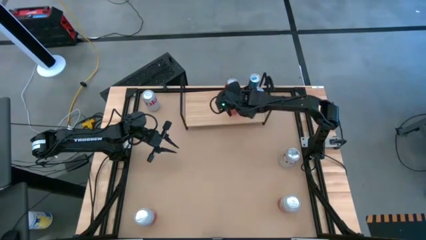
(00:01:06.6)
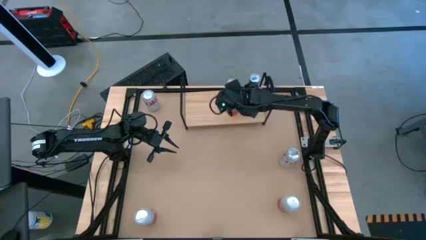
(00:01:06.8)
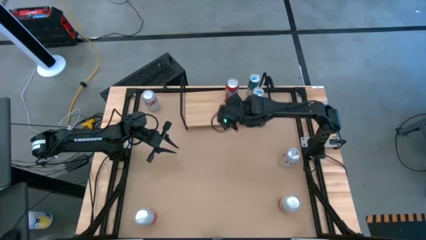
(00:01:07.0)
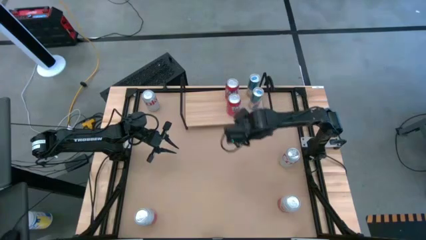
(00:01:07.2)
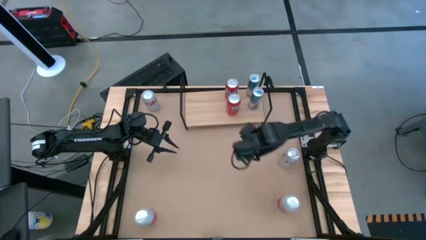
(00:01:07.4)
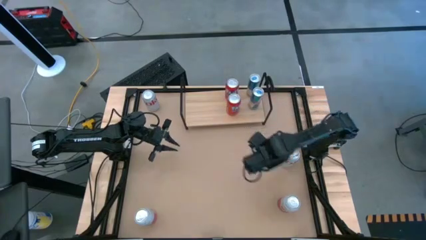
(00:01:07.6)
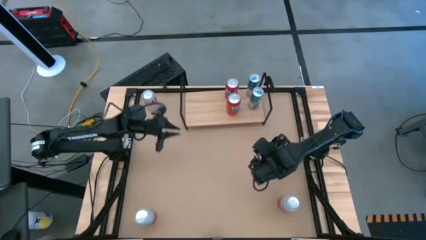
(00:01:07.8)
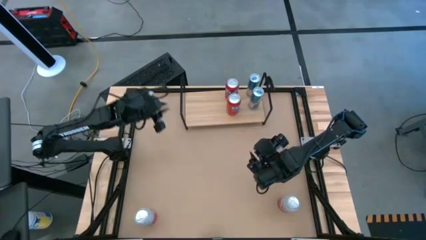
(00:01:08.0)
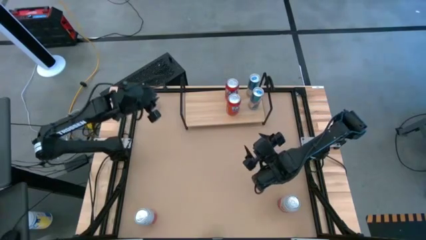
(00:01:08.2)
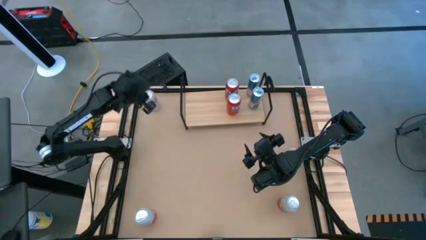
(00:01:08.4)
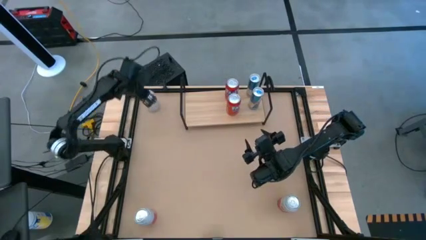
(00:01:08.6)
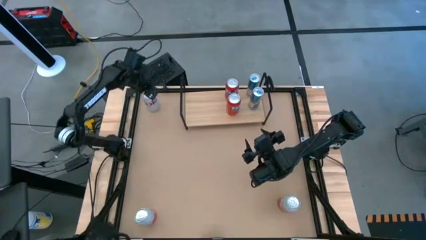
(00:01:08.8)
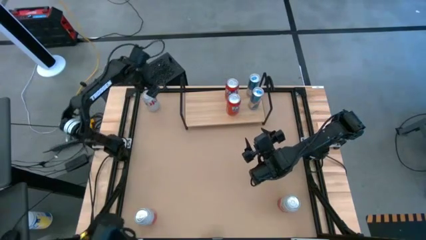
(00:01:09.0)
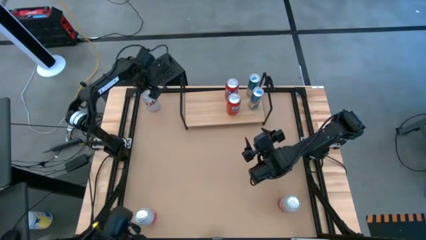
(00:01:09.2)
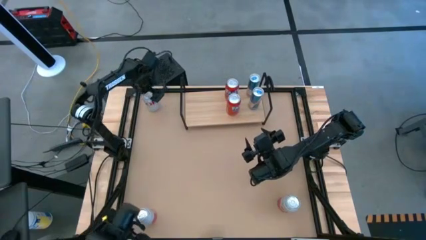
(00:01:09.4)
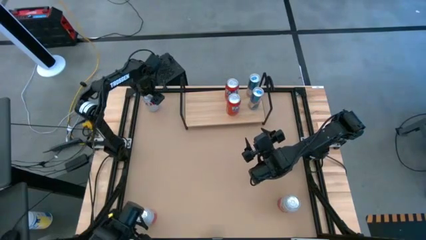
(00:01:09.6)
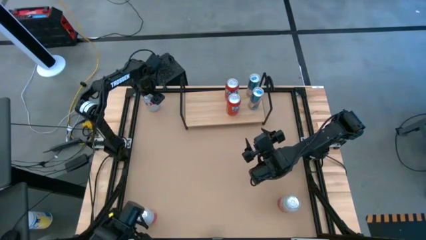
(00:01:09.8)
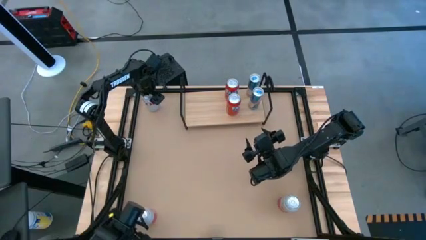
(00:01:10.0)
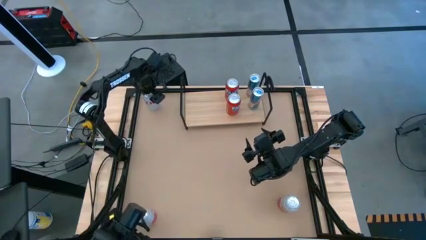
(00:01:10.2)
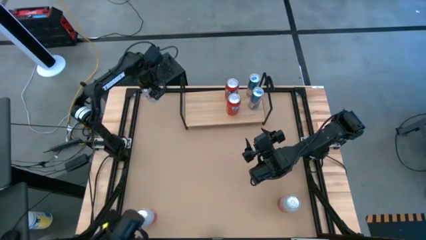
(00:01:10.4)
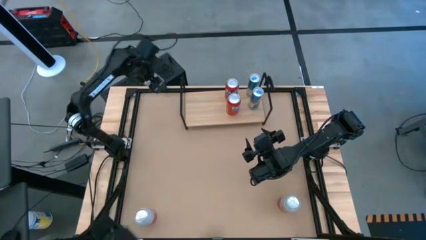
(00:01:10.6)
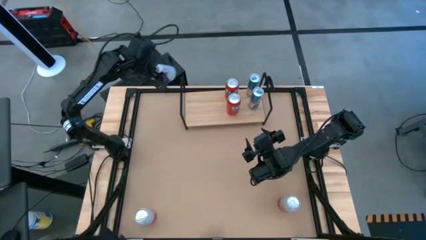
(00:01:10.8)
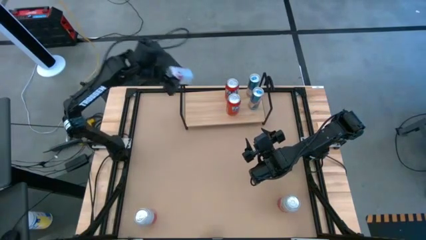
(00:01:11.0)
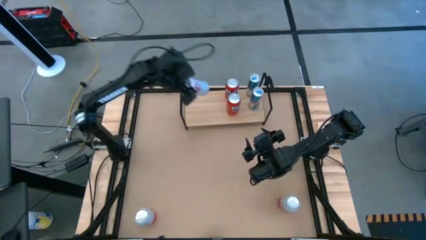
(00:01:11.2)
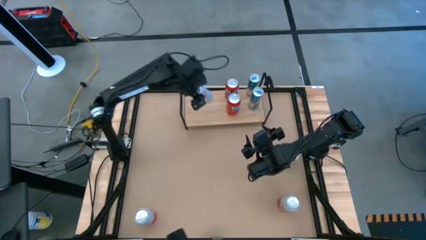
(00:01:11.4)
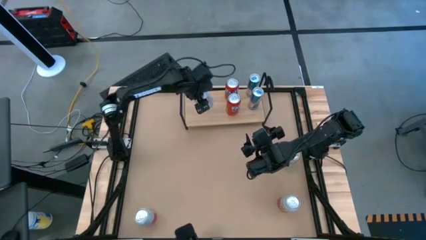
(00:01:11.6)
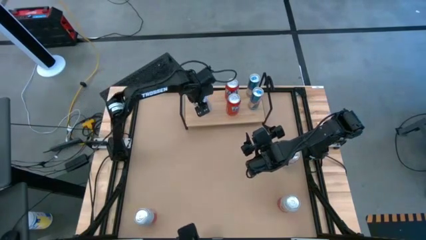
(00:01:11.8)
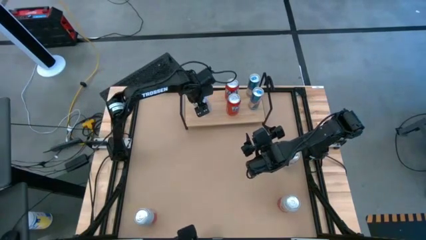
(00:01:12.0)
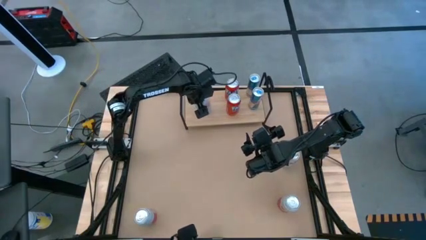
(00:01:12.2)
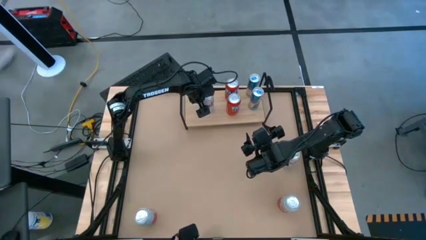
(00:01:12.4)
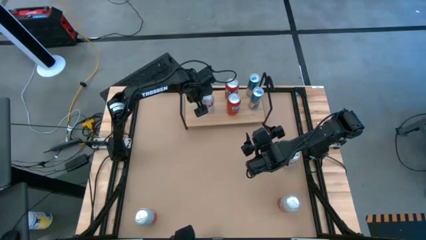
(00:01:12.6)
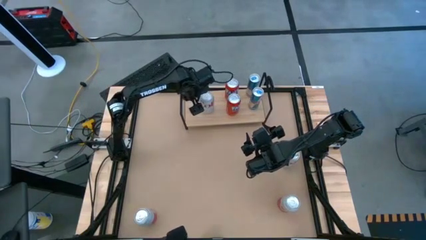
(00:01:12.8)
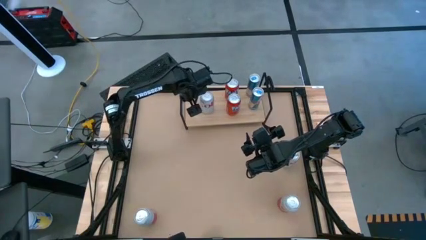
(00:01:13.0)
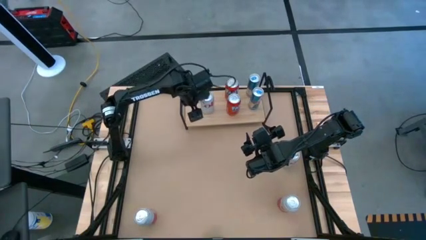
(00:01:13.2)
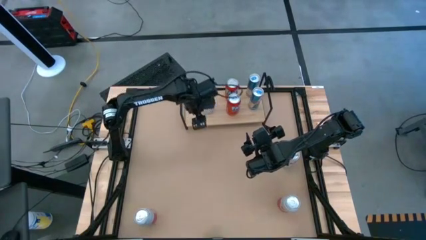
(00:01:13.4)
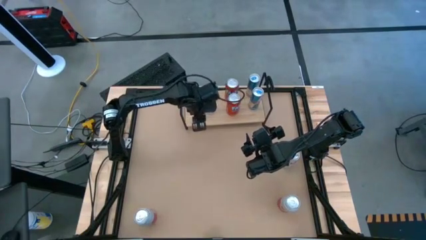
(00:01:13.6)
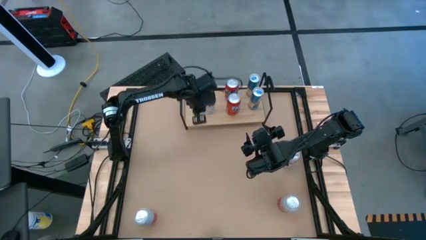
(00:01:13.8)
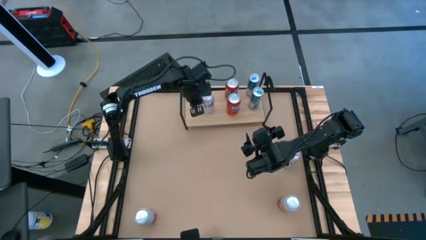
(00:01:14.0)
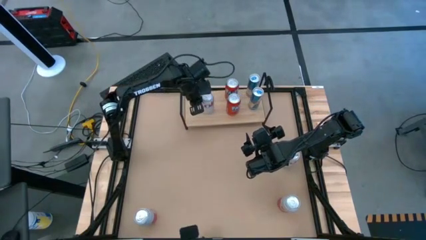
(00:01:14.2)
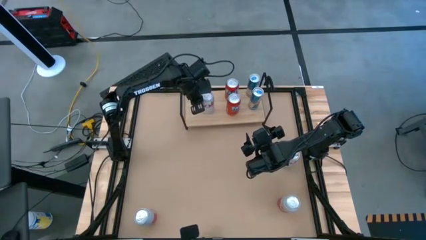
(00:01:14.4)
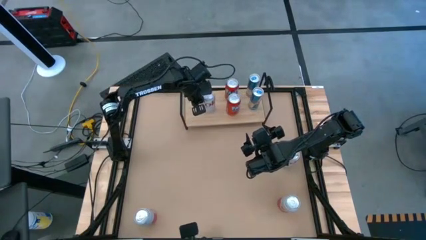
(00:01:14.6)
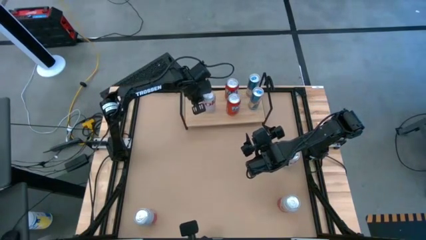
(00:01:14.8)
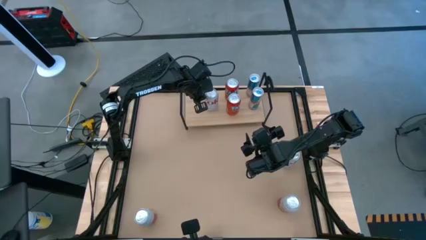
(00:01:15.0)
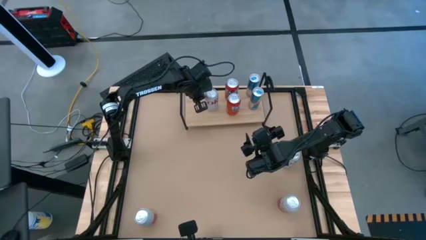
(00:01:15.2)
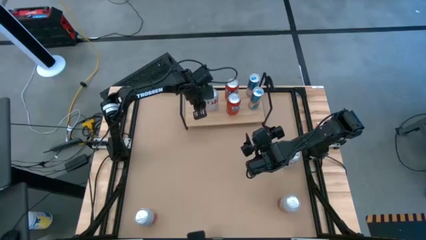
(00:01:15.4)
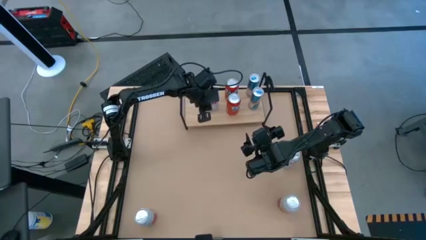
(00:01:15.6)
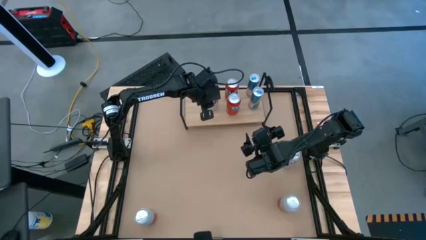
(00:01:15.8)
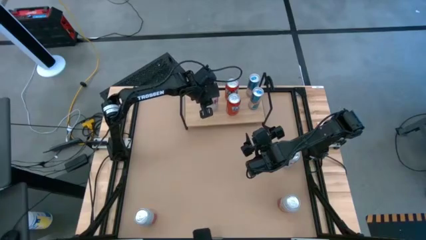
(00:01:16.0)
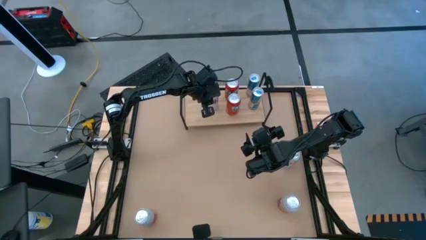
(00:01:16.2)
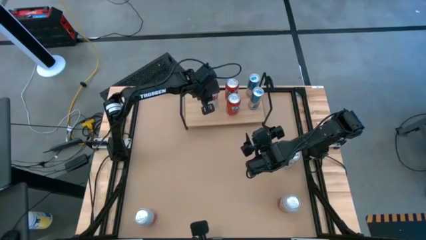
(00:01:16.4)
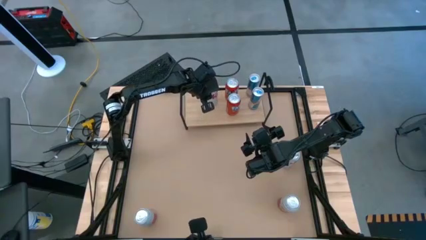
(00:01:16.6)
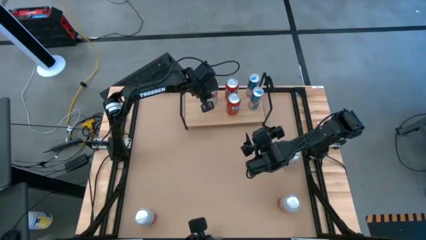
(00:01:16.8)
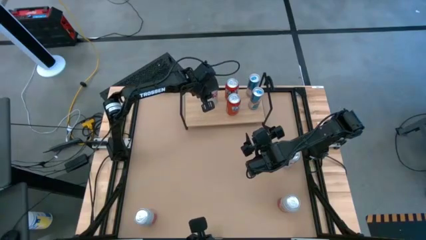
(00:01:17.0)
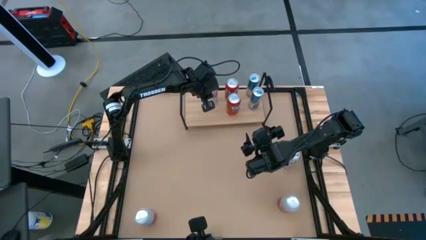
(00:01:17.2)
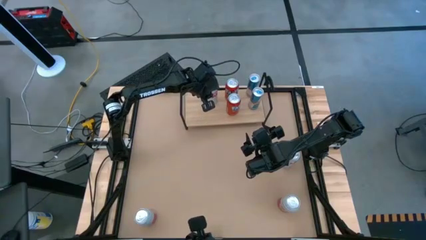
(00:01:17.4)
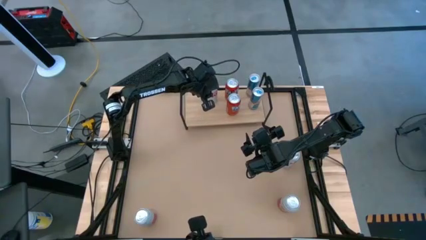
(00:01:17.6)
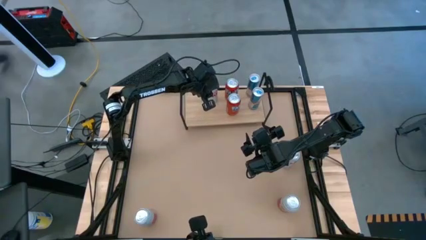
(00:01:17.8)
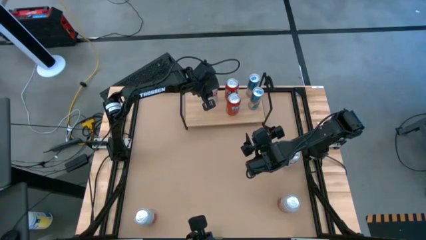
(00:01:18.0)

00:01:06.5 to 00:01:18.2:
Task: Place canned beverage on shelf
Put the left silver soda can on the shelf

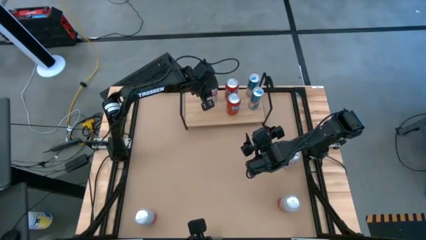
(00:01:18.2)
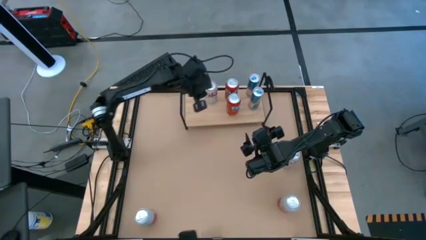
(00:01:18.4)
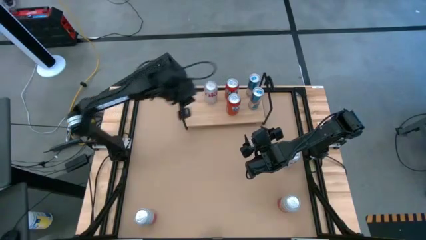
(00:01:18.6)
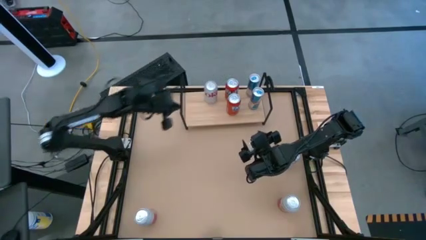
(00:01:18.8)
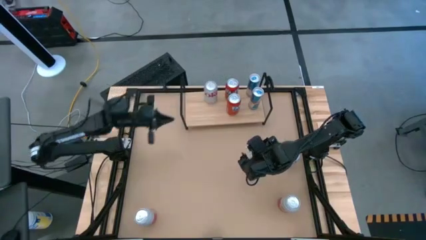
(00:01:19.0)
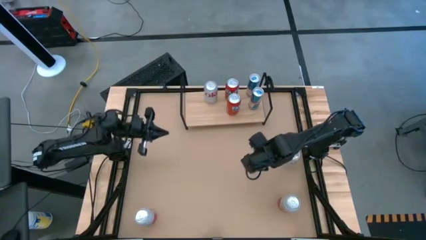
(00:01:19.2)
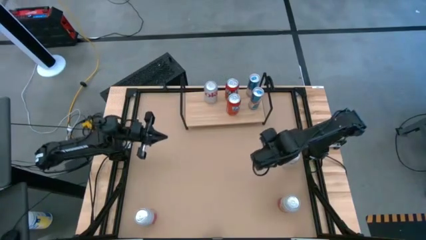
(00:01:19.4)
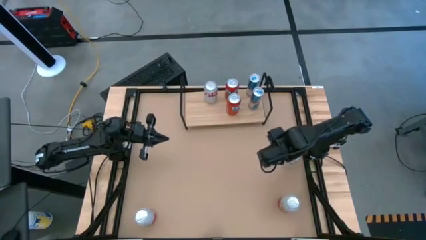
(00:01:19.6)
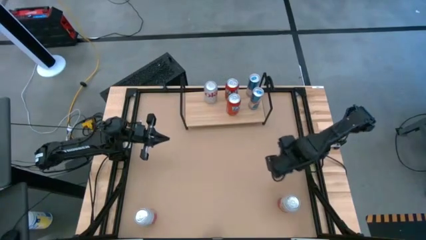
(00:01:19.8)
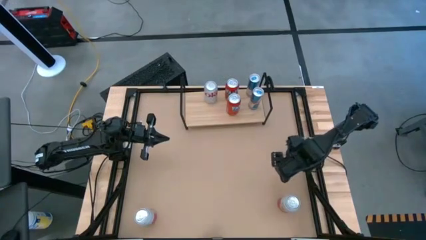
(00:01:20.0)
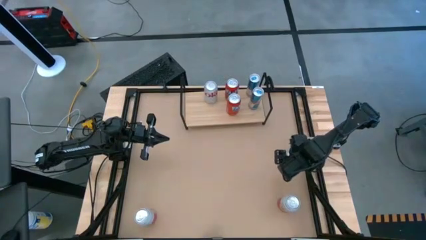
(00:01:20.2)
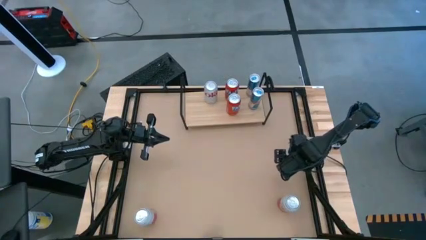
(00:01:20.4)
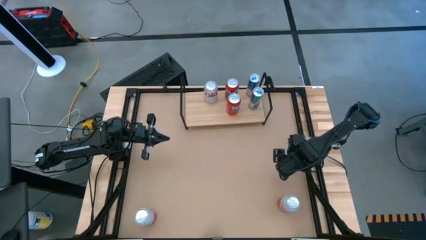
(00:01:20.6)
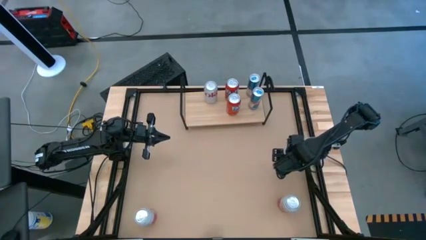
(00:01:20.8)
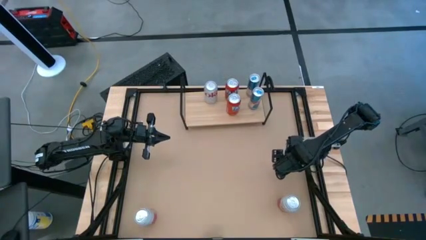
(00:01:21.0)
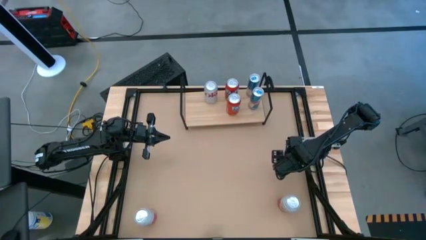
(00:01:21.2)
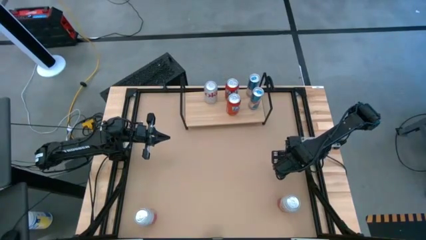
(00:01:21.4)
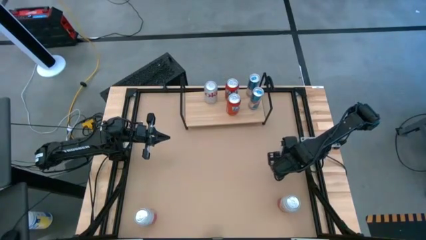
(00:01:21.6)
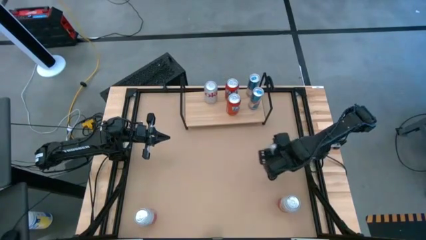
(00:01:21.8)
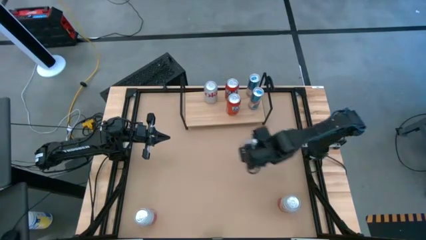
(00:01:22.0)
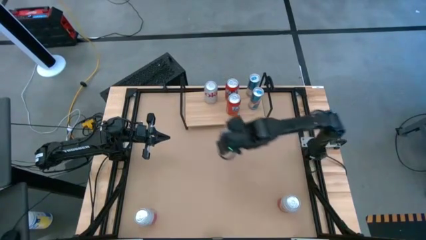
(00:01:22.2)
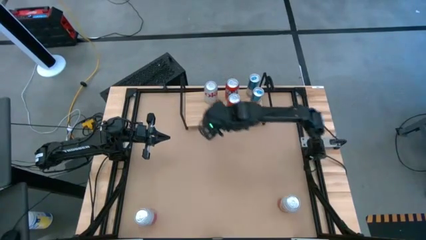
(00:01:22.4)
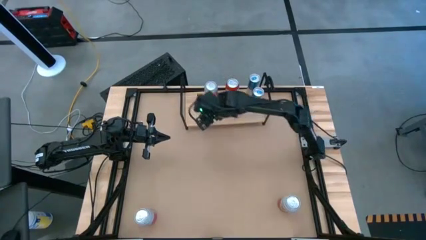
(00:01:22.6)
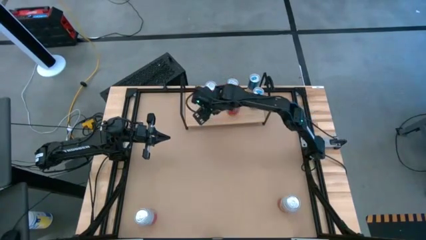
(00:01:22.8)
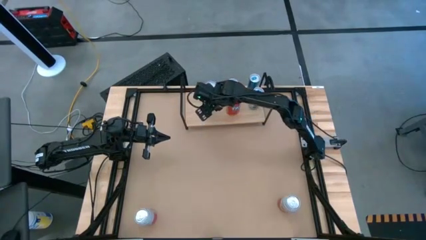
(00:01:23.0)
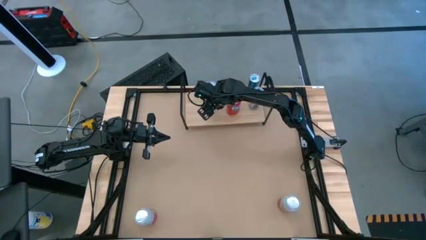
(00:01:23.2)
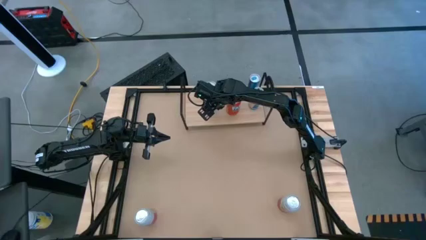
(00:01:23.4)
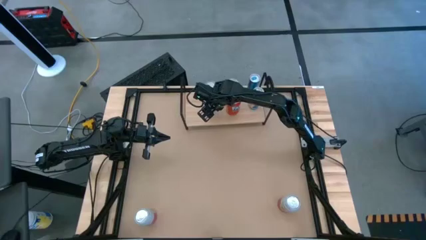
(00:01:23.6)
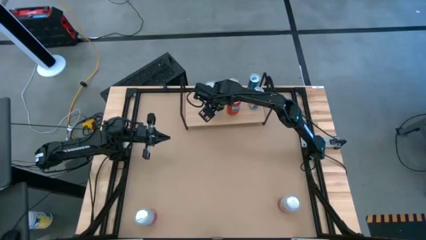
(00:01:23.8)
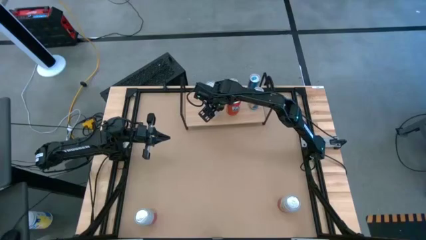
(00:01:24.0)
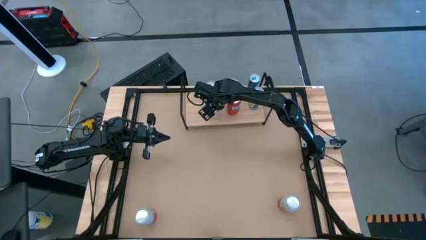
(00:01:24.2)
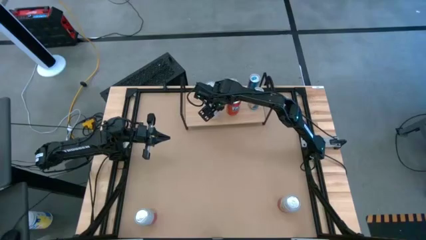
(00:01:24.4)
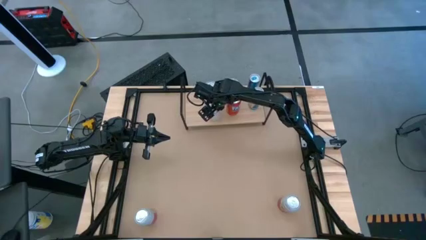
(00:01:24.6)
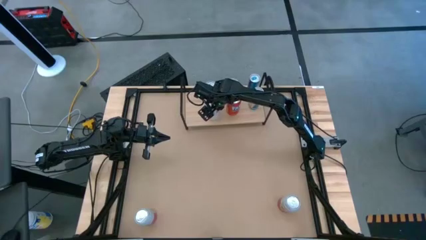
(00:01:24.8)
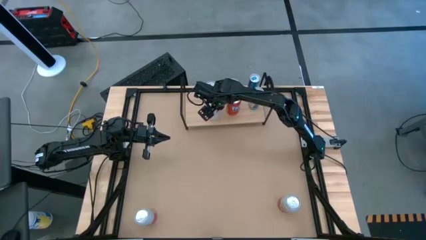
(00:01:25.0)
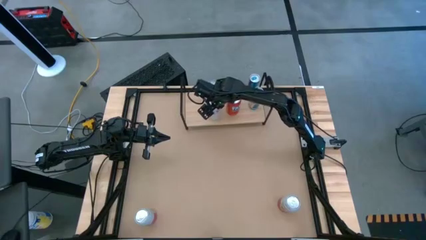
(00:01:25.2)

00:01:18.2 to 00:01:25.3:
Put the silver soda can on the shelf aligned with the other silver soda can on the shelf
